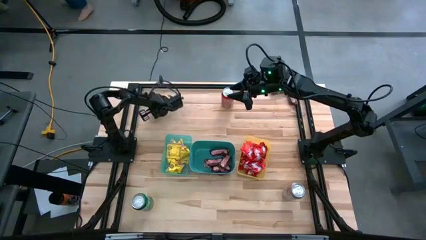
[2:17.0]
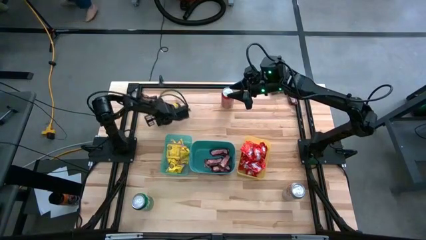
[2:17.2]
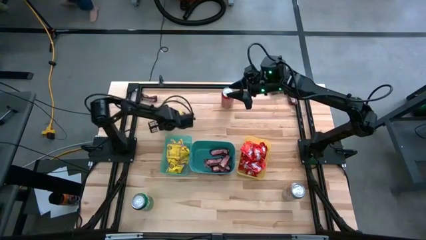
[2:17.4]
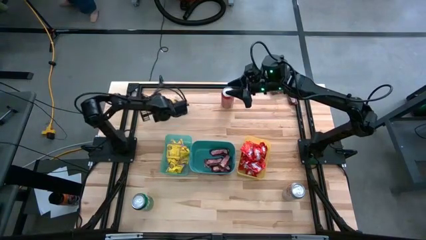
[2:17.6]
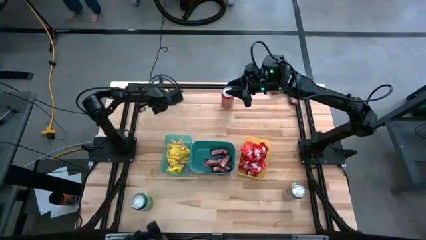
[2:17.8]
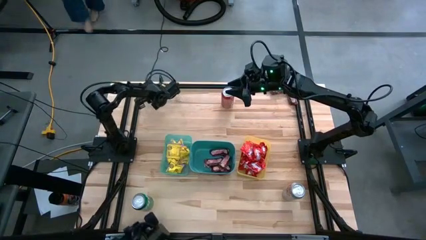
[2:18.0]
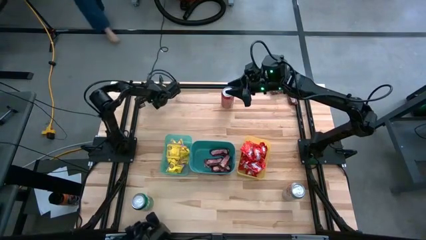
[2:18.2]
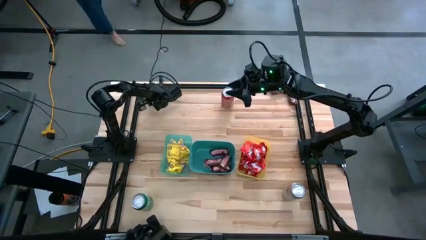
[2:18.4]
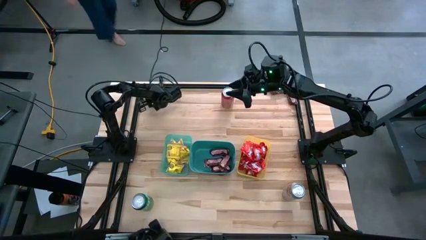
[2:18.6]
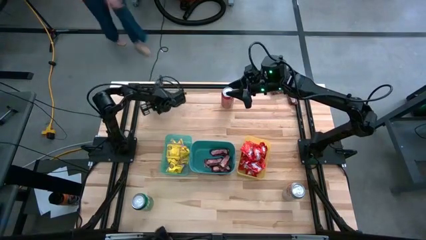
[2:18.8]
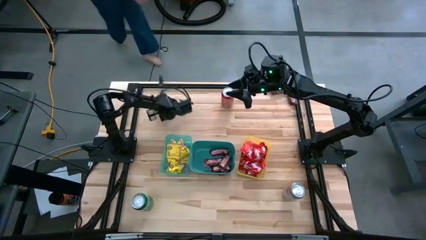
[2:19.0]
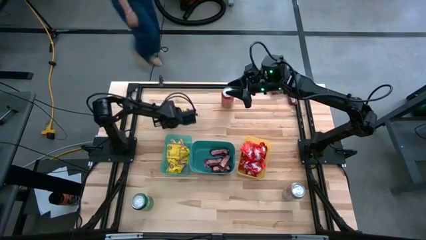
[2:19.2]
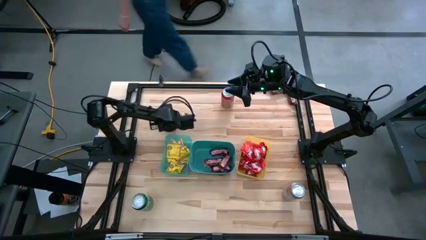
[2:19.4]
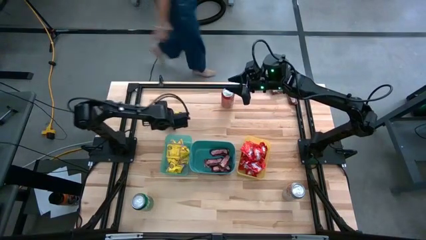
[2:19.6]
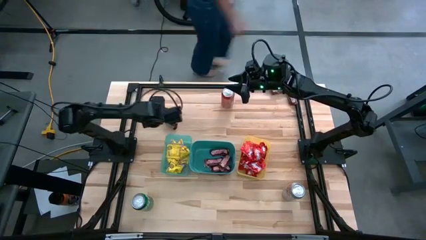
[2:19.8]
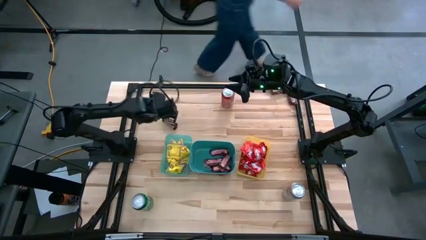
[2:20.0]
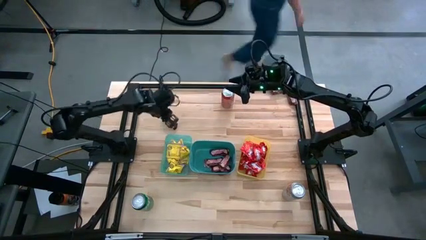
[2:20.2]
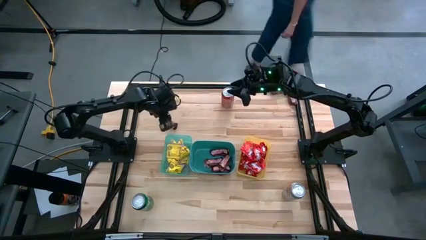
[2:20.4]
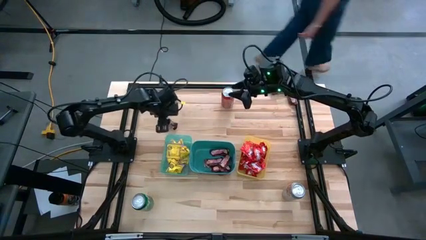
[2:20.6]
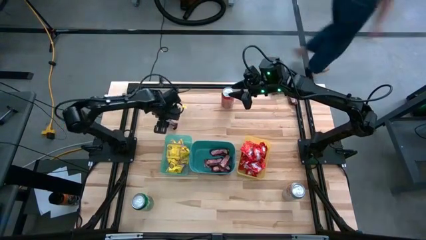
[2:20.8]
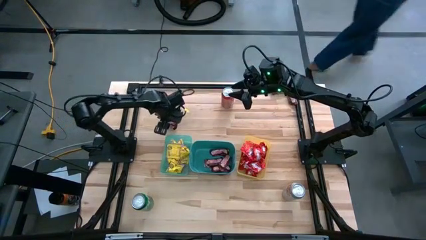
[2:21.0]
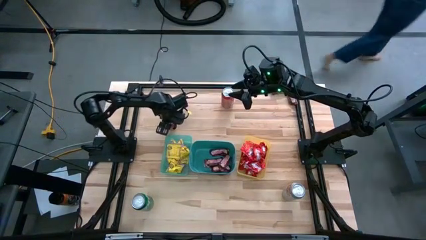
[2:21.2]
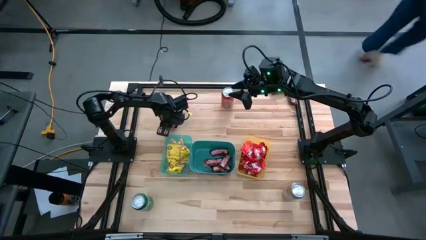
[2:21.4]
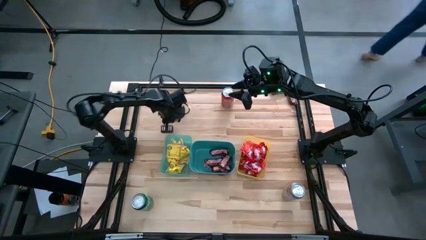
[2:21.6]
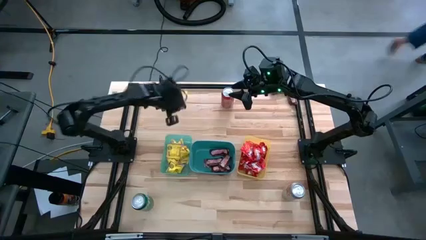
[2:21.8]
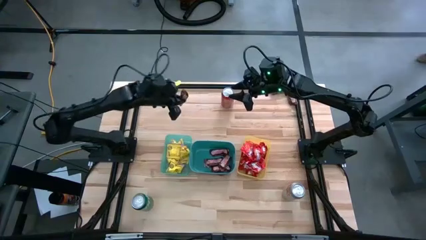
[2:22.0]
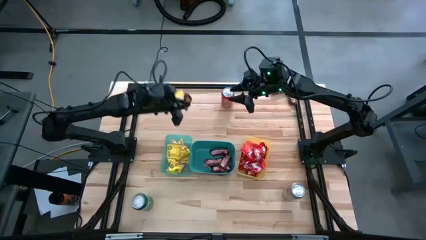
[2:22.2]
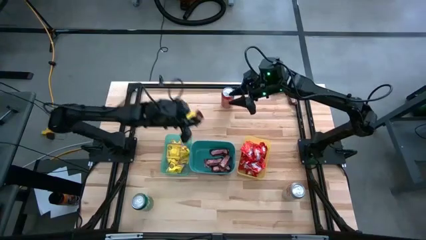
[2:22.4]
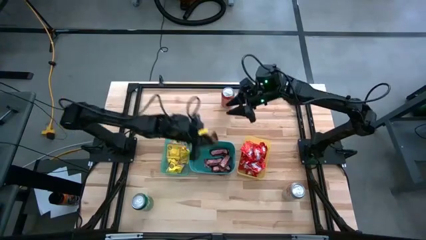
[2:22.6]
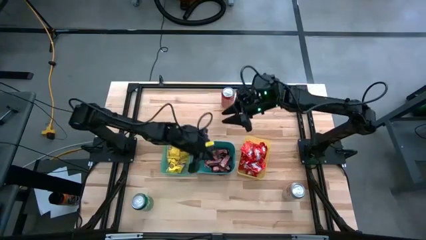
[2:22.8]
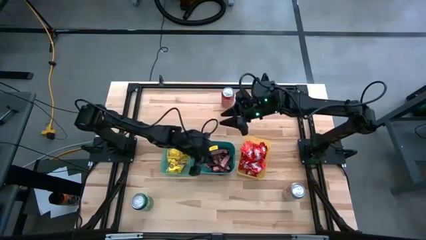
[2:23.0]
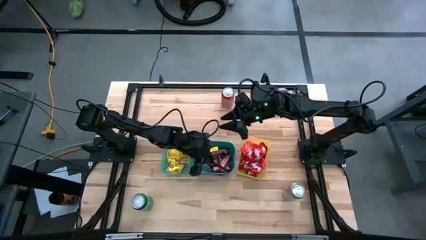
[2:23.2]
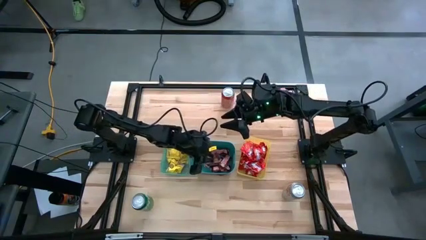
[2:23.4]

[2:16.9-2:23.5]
Task: Sort candy
Put the brown chocolate into the green bin

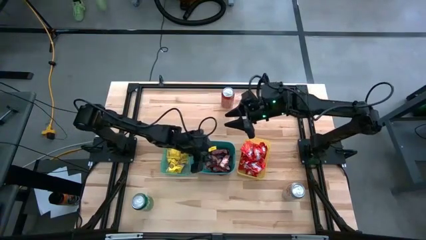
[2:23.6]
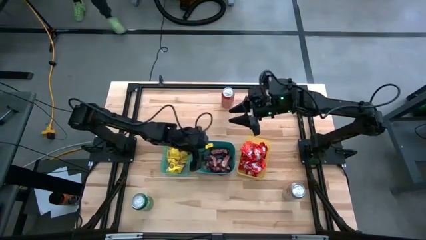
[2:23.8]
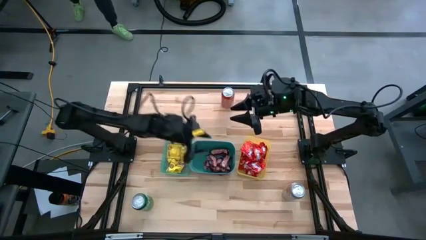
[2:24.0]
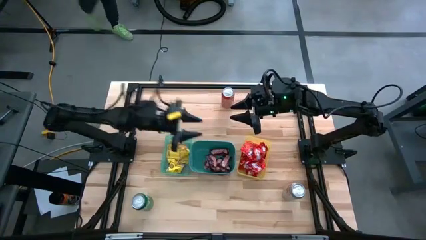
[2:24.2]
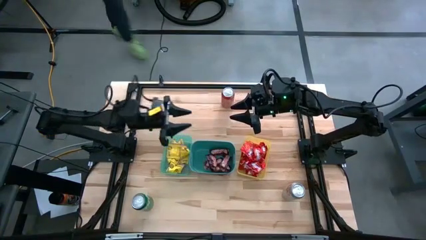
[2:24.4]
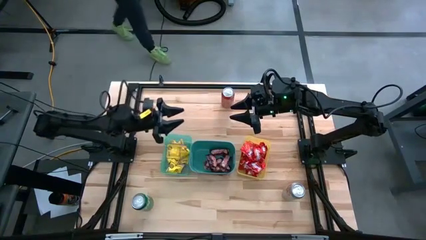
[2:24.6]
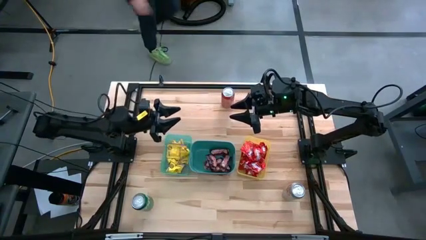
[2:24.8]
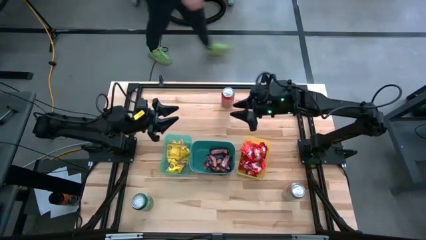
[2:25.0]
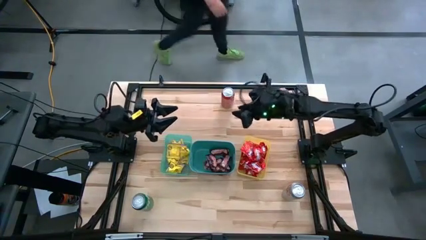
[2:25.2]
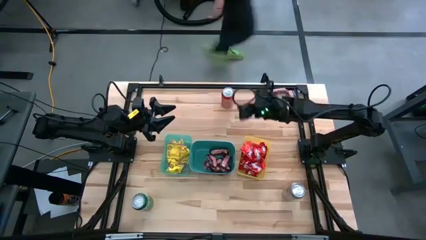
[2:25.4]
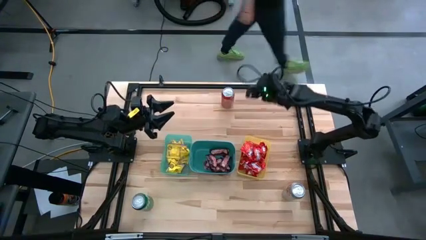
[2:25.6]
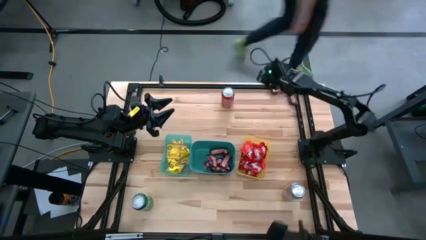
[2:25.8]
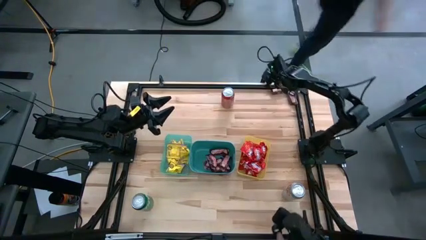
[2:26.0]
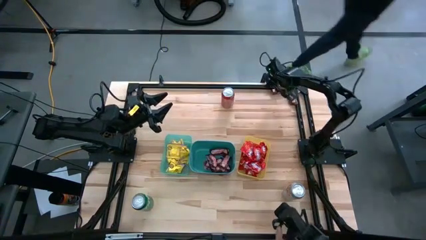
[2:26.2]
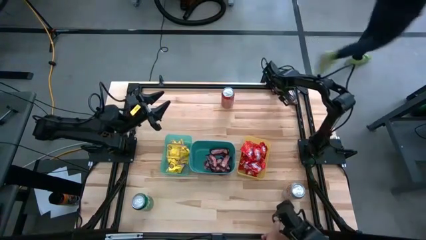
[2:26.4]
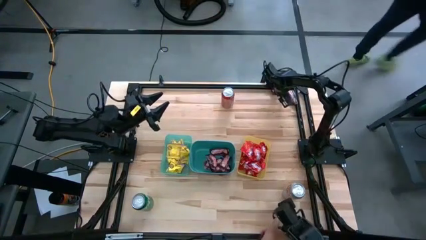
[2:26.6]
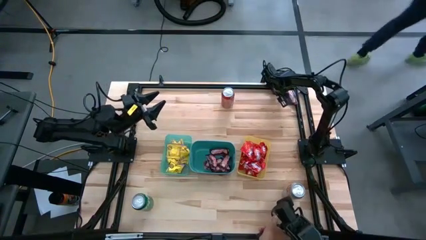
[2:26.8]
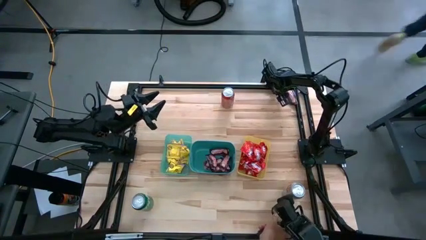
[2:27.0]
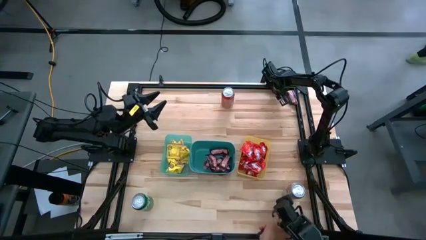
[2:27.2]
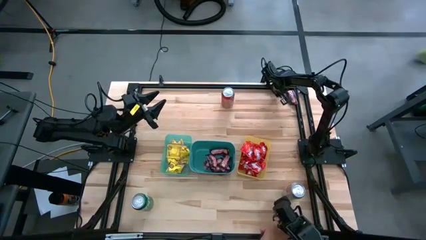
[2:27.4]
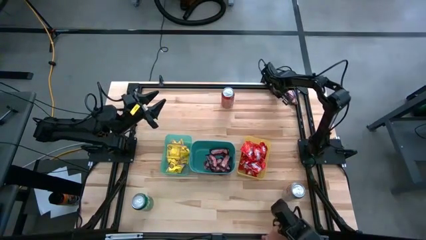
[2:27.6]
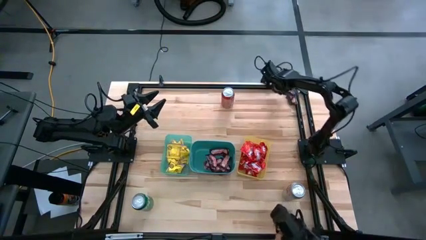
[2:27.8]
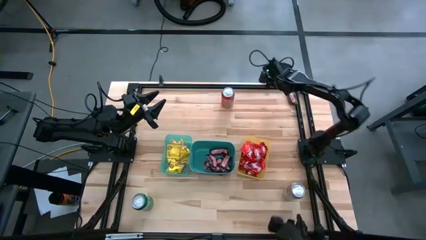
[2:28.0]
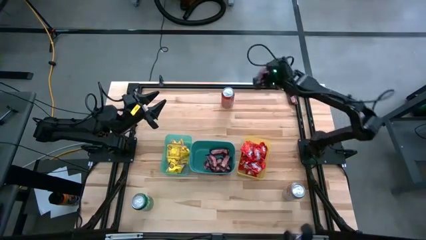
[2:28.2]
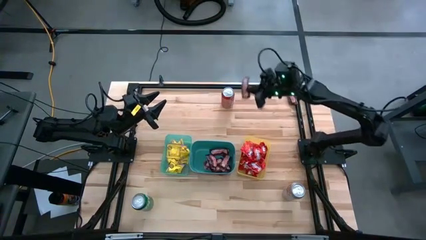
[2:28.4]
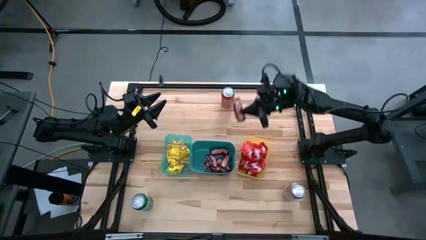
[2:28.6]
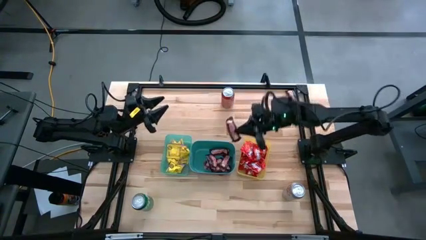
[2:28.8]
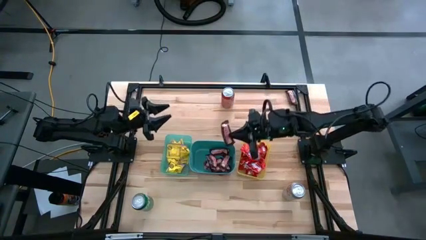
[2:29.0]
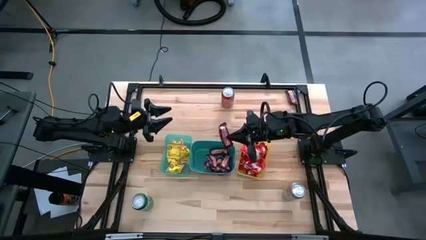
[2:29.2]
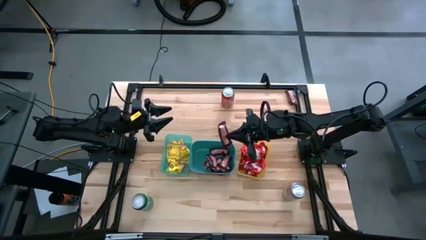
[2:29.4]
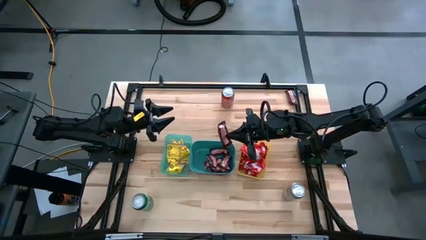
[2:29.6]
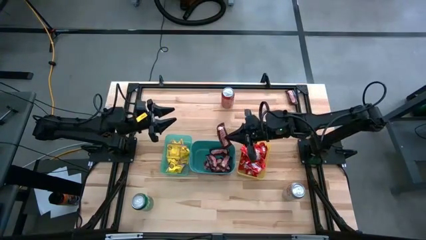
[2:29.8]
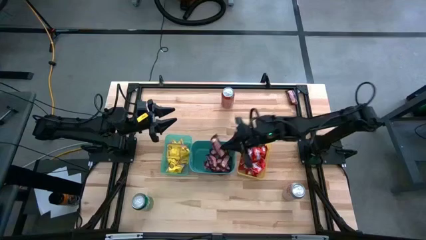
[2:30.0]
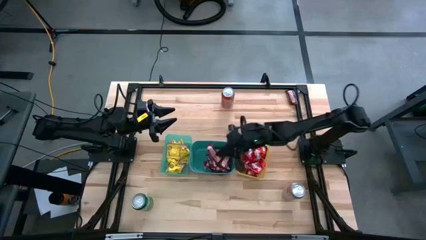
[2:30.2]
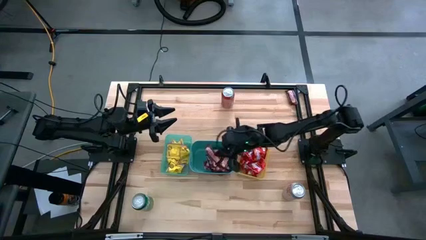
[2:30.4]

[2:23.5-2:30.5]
Put the brown chocolate into the green bin

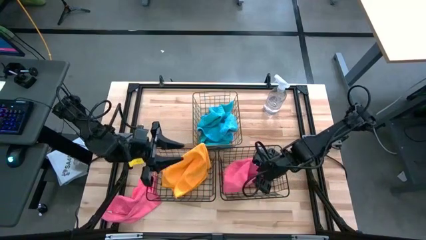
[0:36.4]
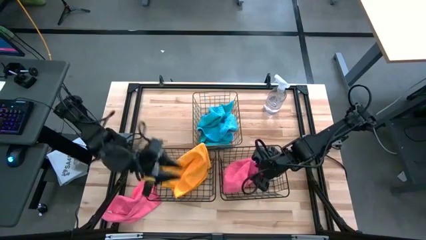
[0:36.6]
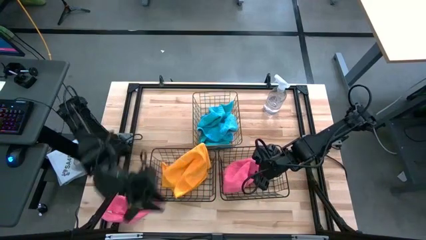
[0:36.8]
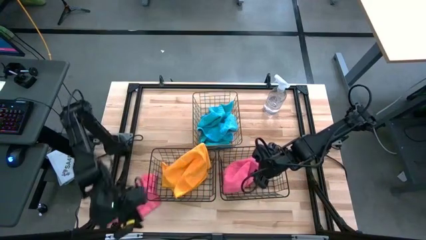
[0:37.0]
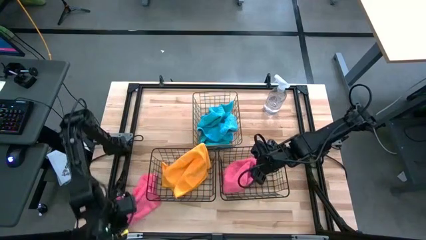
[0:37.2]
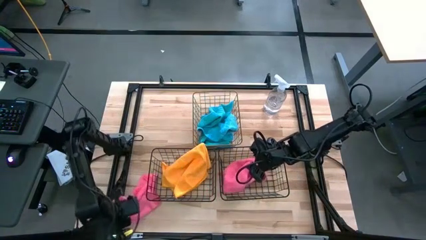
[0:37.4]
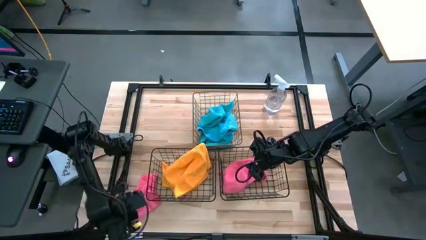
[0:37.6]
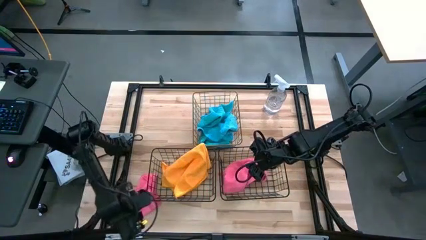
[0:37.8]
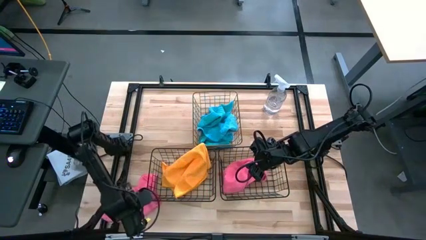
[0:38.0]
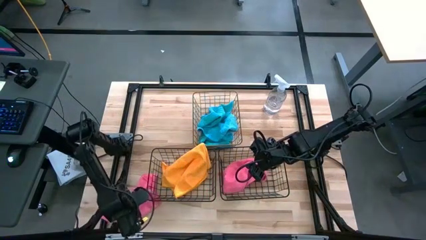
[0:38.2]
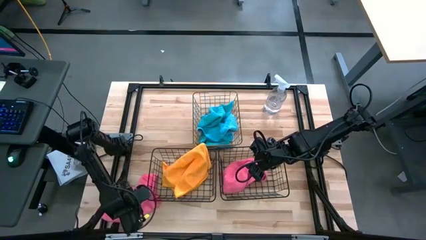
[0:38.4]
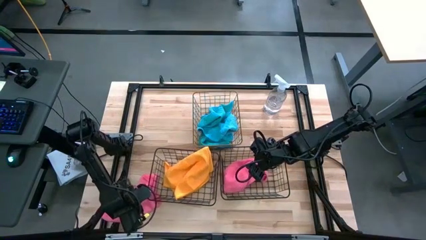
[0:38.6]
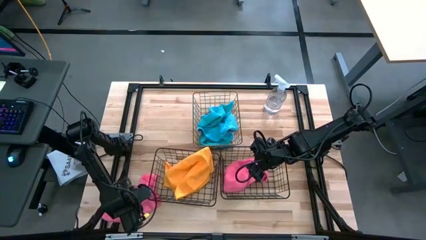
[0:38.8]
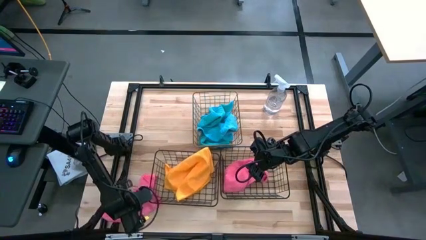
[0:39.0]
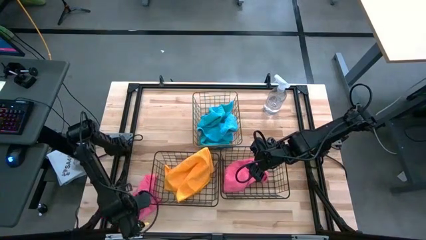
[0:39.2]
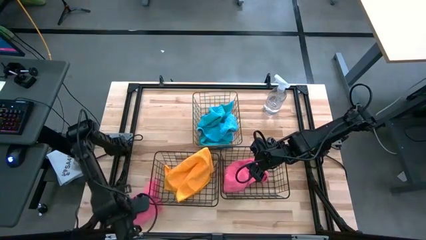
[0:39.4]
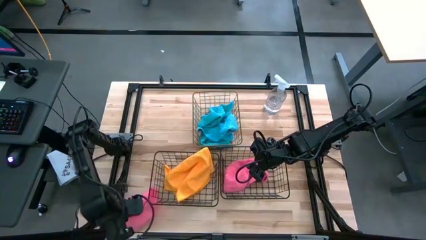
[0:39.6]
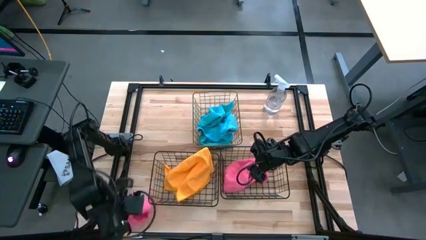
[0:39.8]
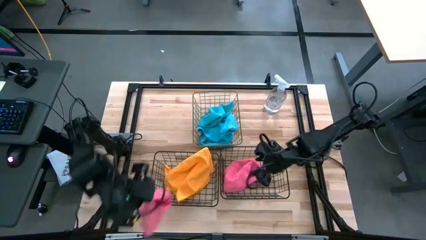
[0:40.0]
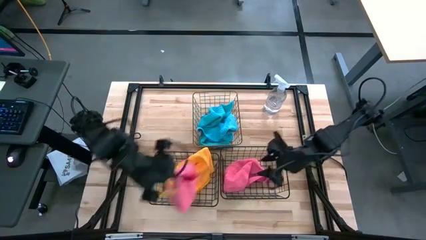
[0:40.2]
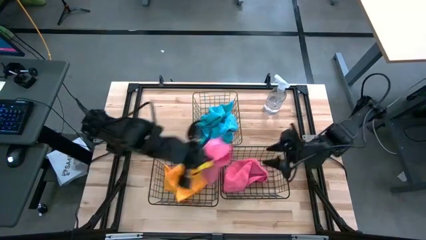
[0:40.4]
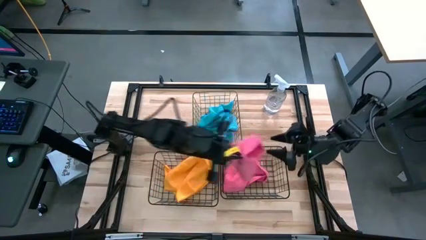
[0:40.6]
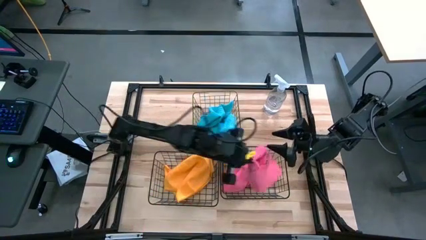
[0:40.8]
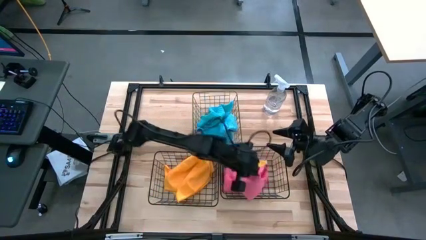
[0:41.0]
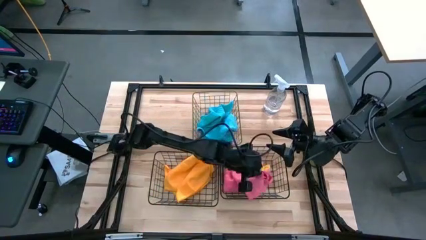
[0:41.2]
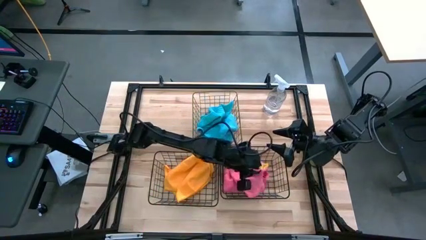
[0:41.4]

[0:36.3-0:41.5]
Task: Sort microfiber towel by color & place in baskets
Put the pink towel into the bottom right basket
